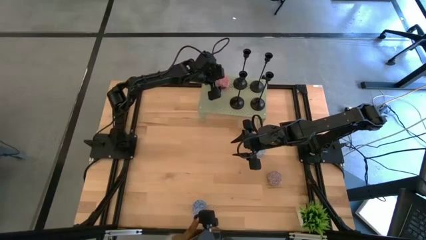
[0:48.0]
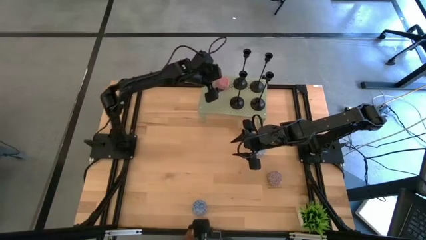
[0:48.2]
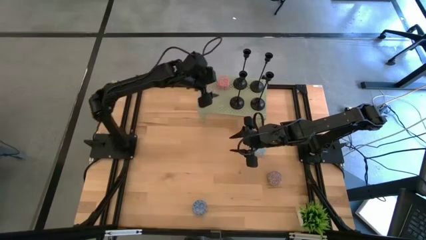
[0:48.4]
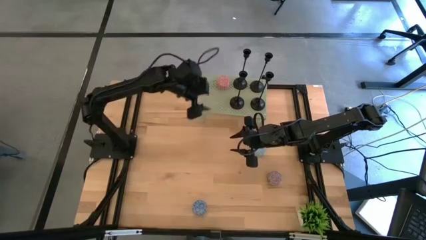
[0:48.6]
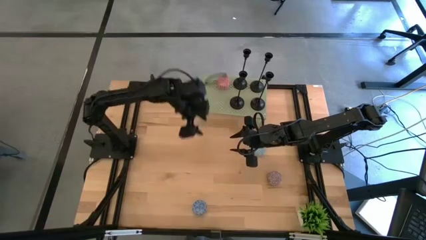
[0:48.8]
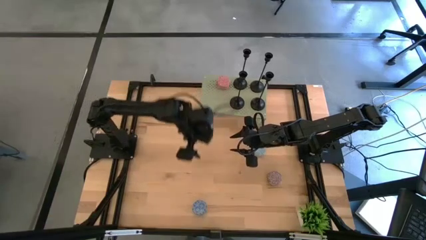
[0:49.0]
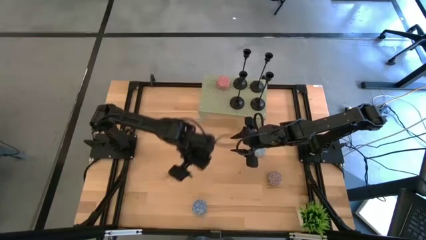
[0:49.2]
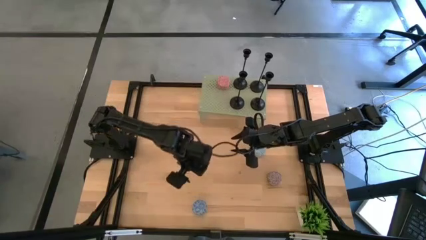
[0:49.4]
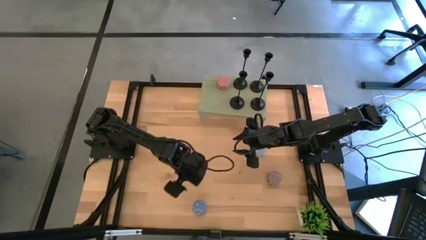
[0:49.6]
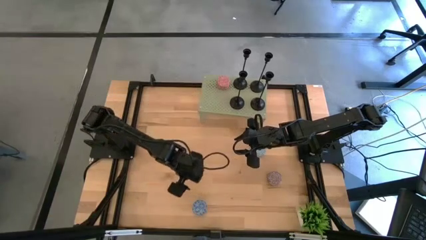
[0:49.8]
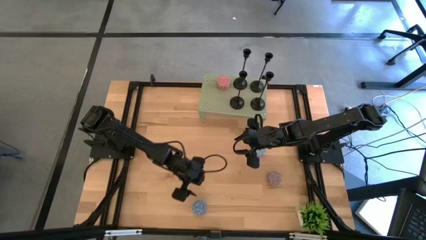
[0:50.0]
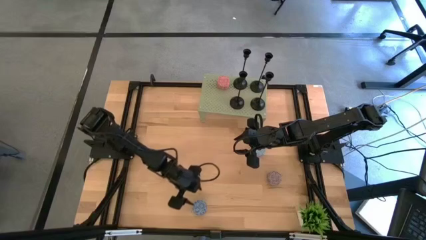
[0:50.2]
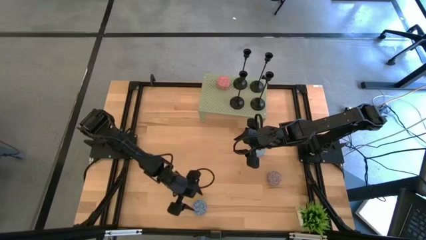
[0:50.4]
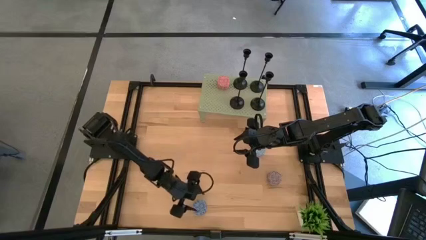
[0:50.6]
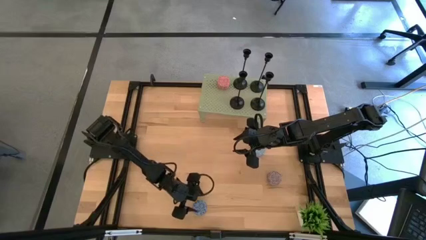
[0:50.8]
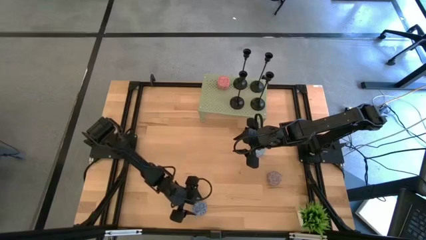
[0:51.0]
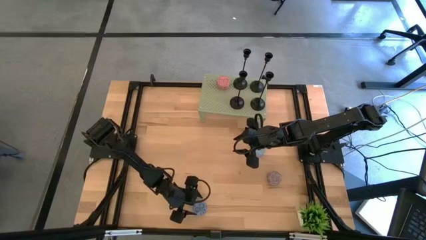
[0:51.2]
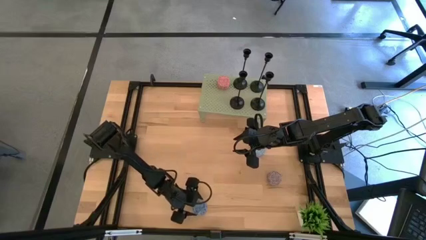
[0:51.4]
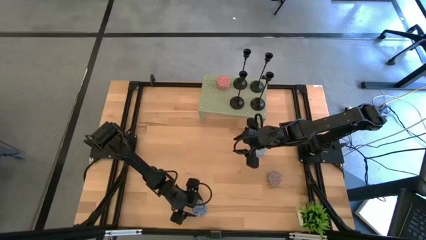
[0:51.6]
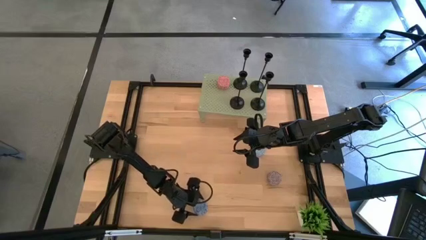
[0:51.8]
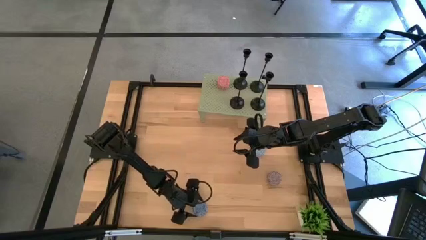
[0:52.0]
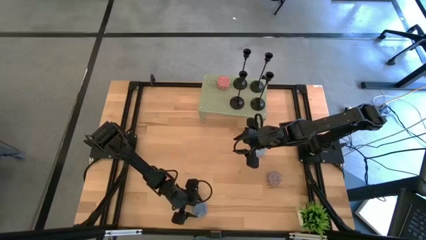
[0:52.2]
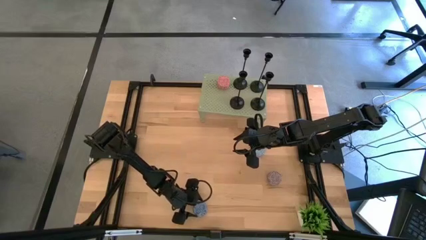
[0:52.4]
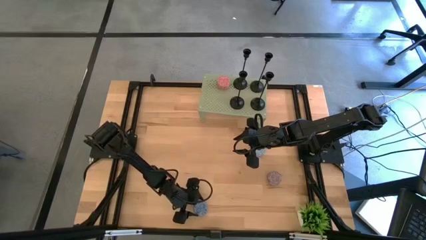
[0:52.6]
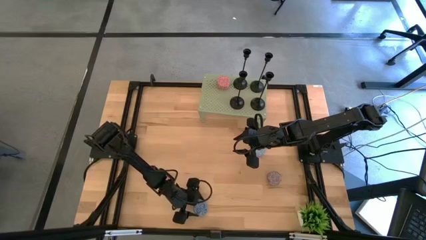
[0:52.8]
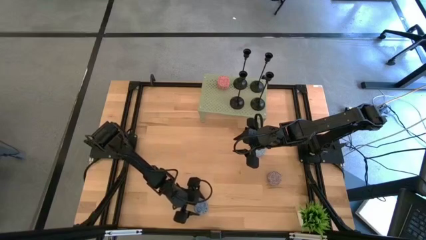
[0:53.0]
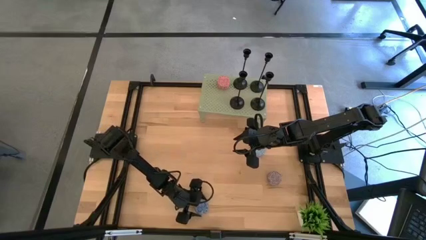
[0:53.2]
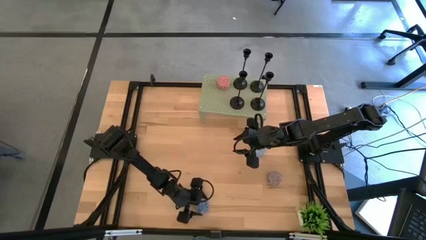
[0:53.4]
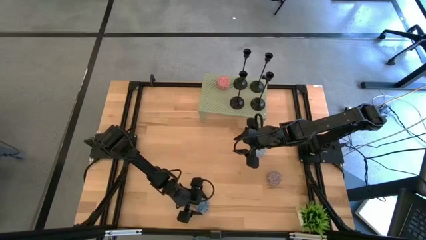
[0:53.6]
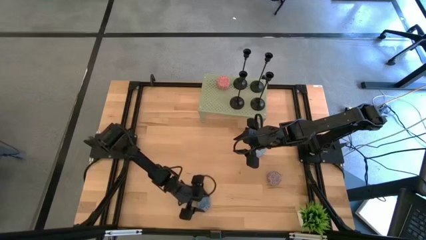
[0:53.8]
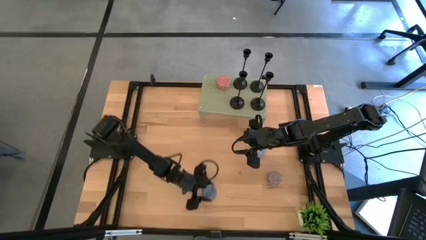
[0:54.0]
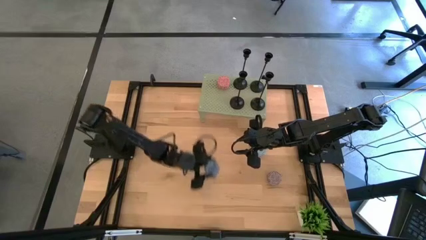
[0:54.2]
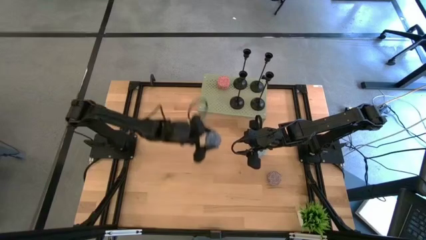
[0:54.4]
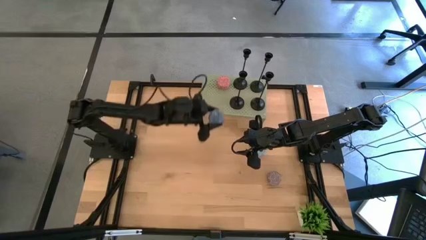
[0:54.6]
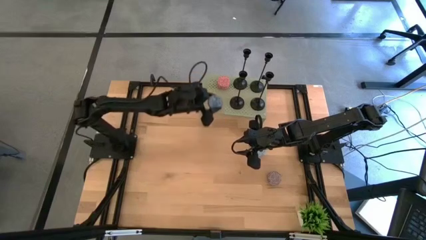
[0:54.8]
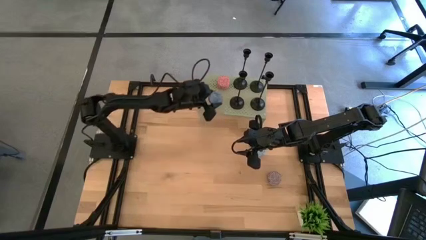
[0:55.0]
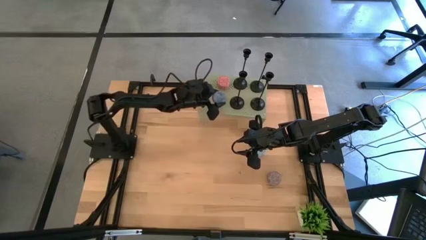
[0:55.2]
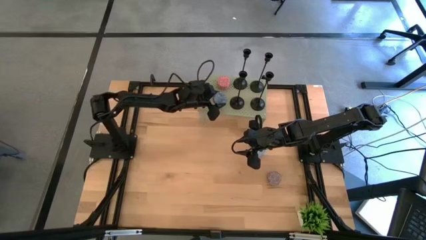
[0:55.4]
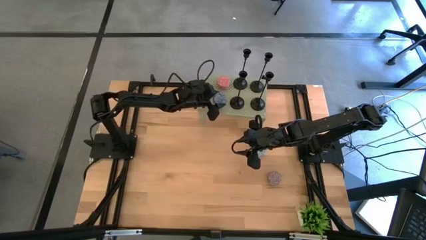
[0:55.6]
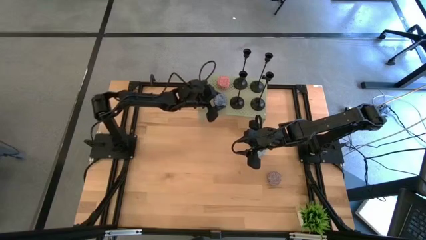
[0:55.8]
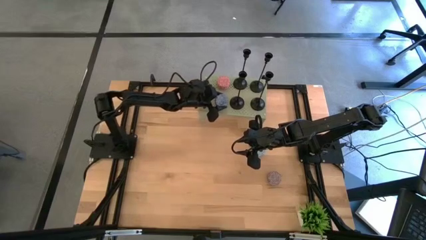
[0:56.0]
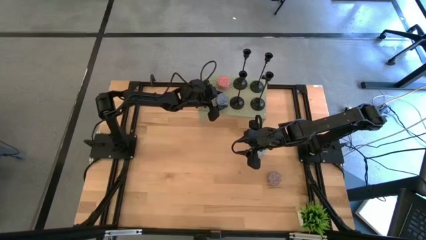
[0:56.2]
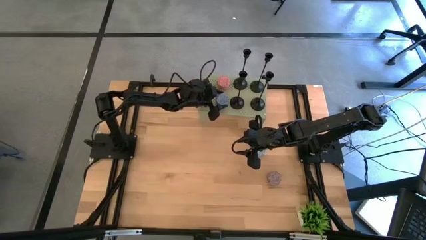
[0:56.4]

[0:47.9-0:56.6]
Task: Pick & Place candle stick holders
Put the dark blue scented candle on the shelf aligned with the other pink scented candle

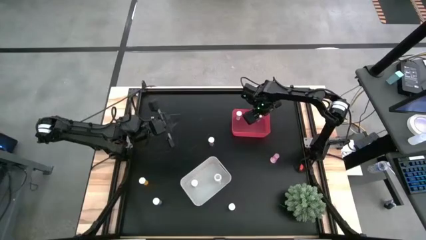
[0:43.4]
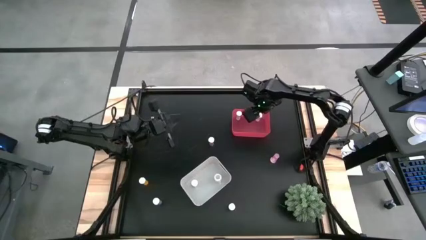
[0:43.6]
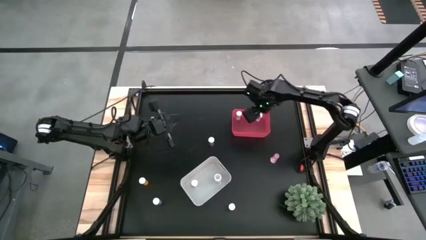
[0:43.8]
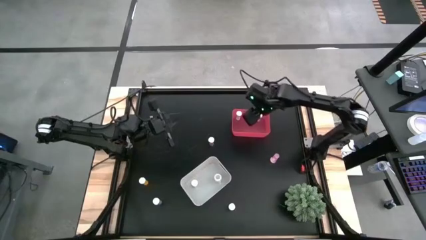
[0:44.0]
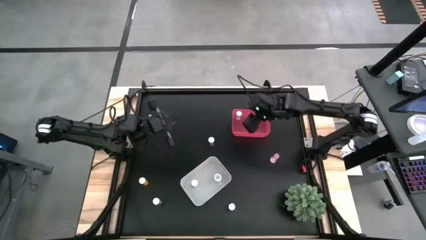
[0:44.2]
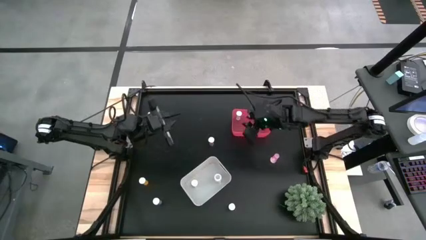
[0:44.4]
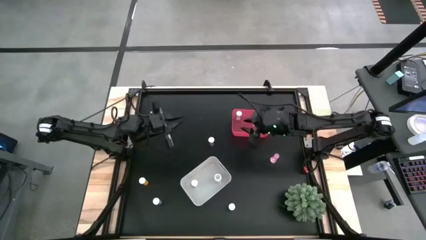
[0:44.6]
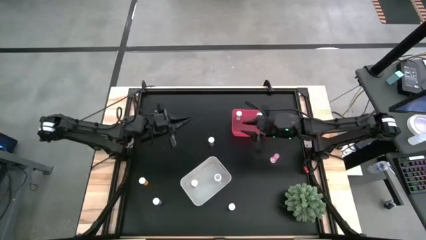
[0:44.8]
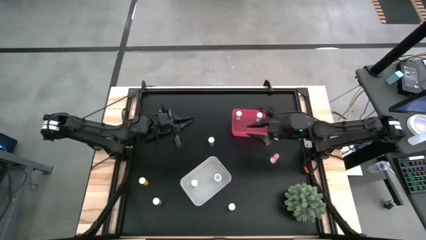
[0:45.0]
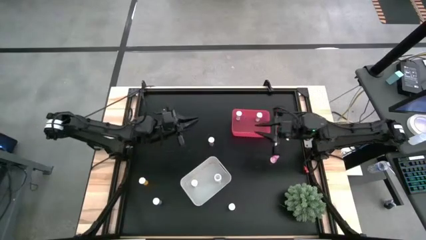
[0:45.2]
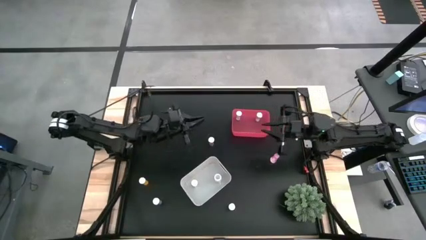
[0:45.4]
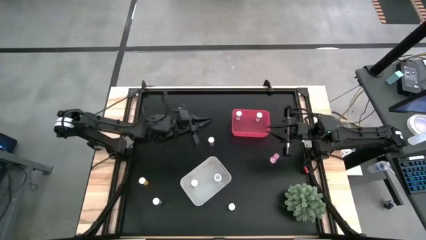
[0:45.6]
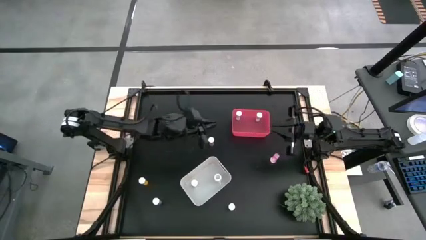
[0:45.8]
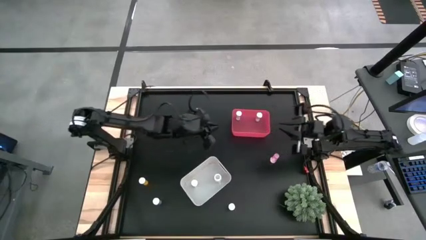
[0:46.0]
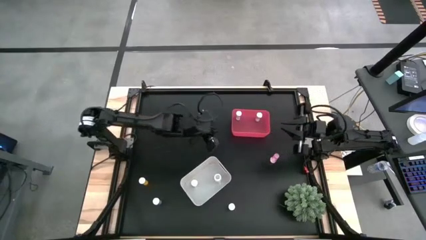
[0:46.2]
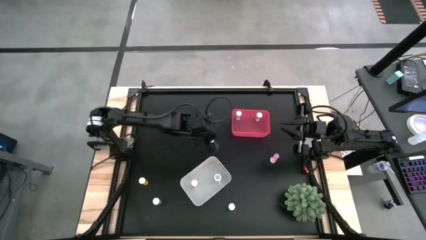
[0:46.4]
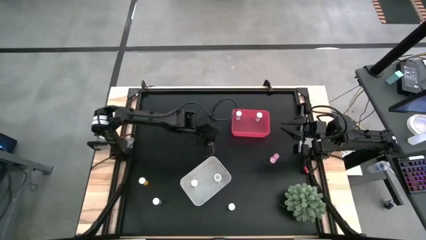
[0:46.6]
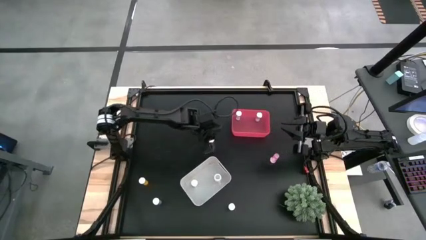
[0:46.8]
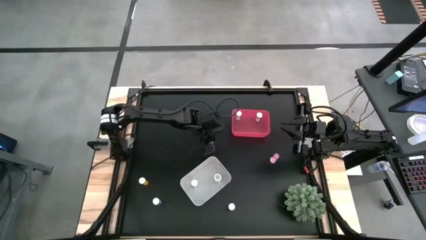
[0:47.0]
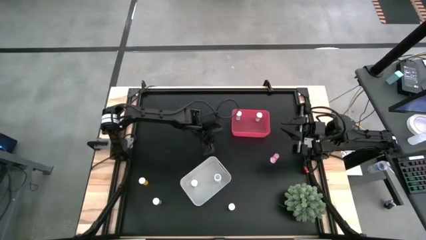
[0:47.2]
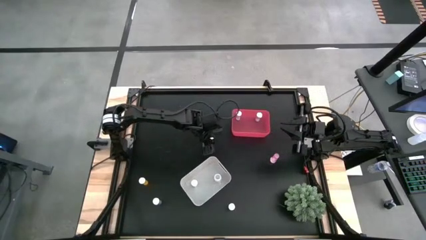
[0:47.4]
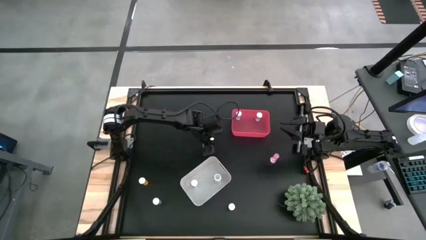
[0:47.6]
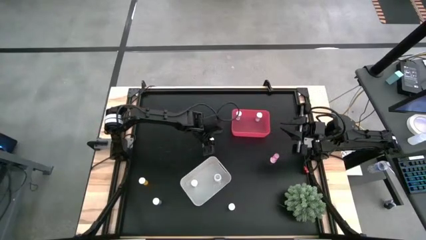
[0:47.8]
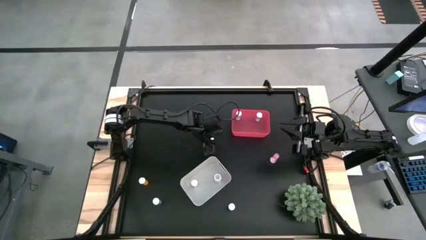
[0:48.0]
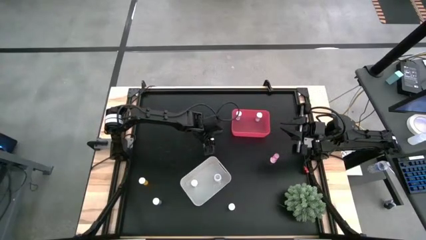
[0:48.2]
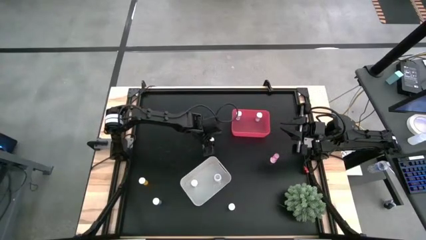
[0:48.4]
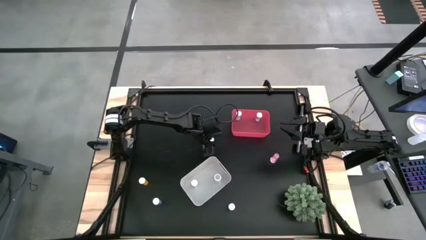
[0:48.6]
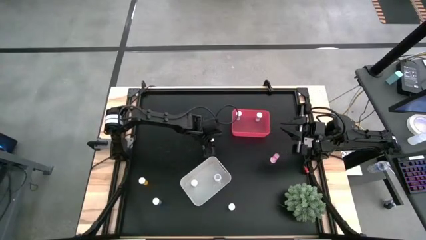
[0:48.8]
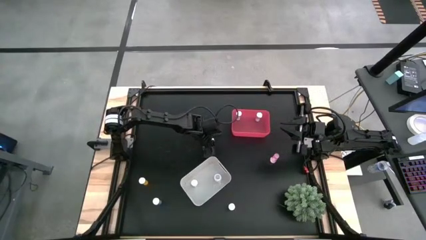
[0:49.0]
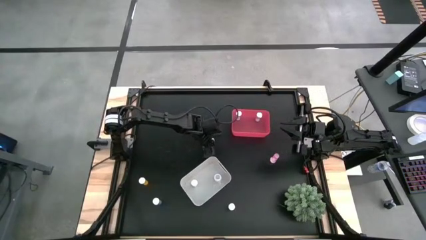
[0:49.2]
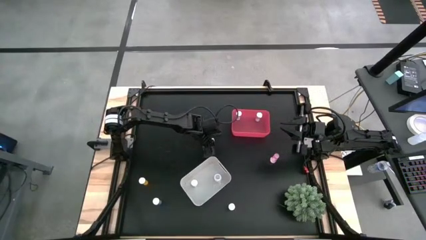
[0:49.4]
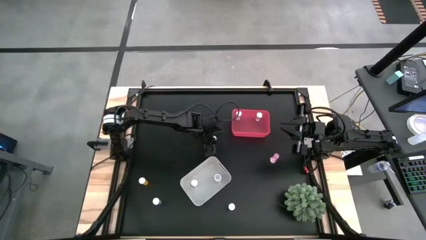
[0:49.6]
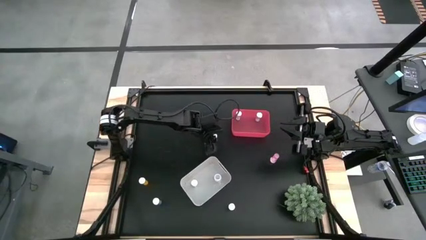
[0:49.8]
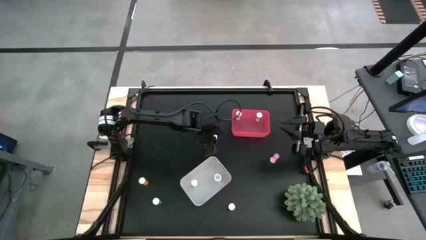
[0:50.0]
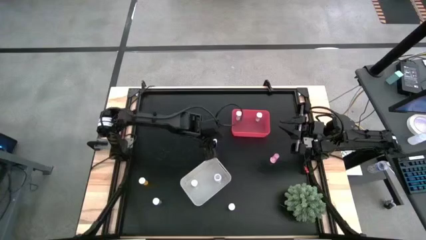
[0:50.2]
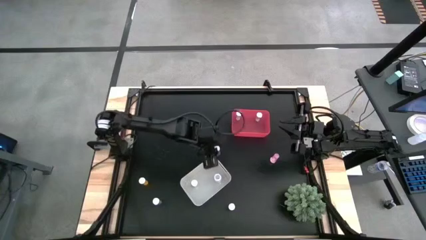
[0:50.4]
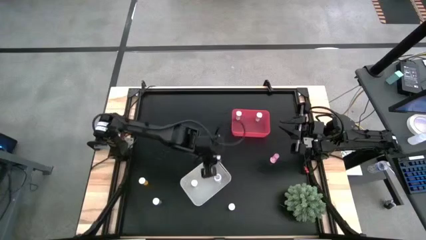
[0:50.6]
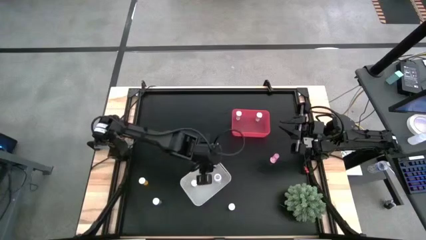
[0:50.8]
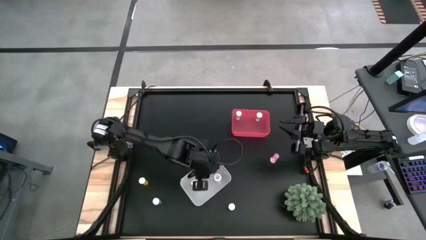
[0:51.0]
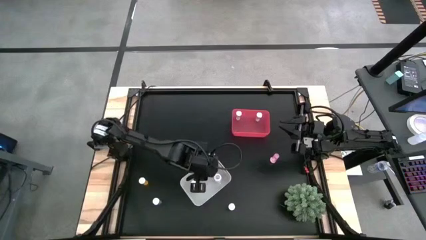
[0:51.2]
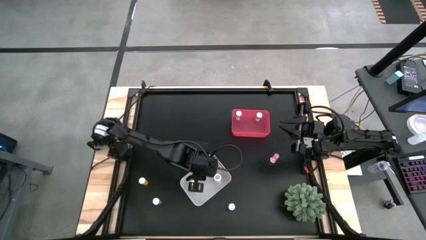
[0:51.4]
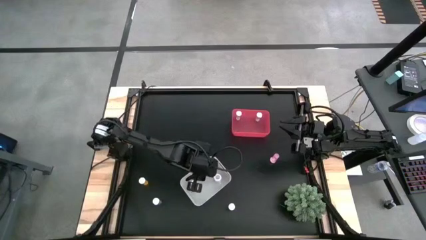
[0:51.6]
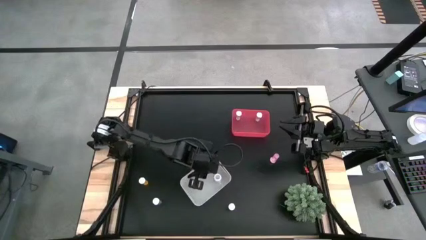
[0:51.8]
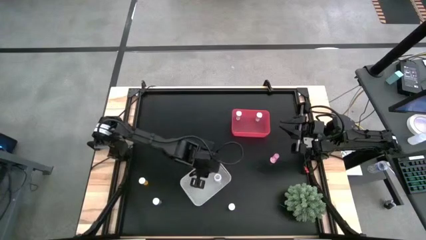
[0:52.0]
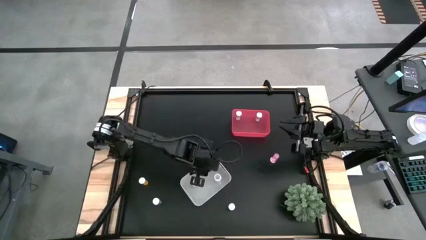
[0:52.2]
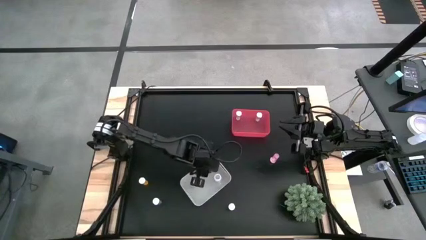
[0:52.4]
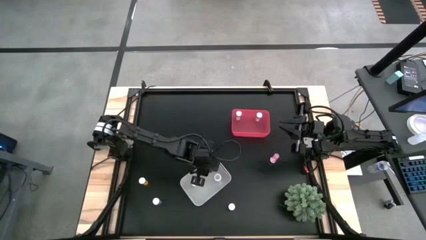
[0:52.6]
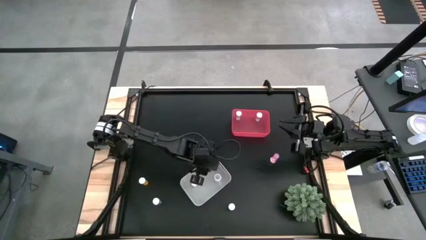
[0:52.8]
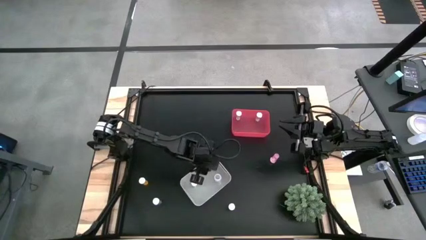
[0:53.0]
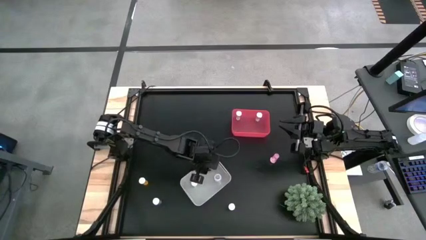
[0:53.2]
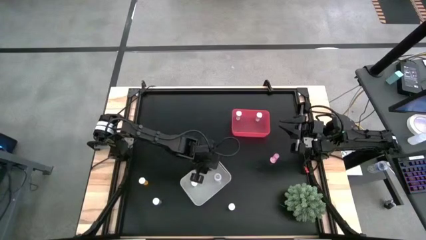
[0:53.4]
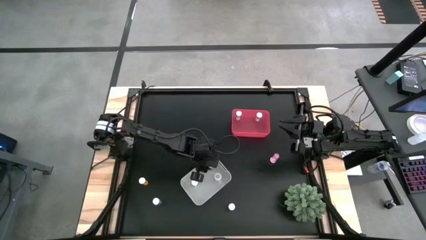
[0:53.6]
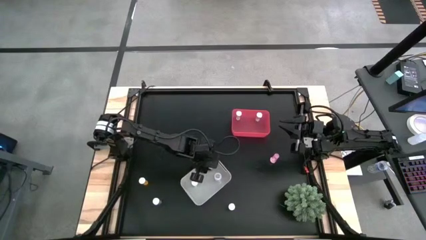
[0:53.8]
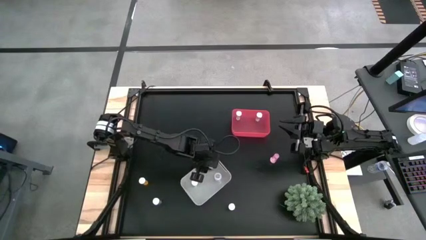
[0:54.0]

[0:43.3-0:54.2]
Task: Pick and place medicine bottles into bin by pill shape (circle, oval)
Put the top blue capsule bottle into the white bin
